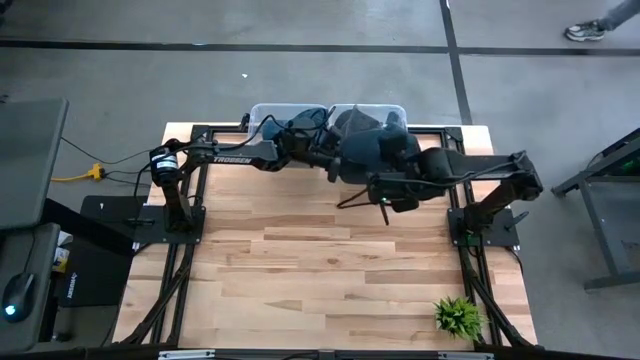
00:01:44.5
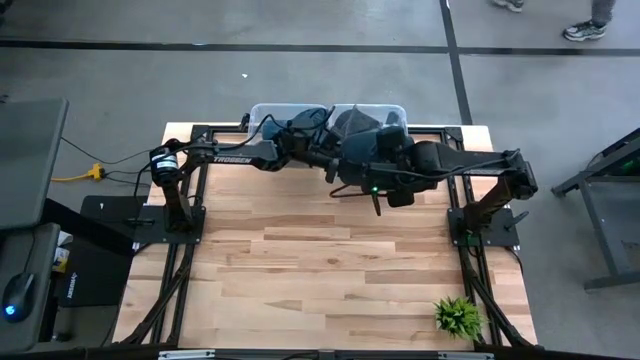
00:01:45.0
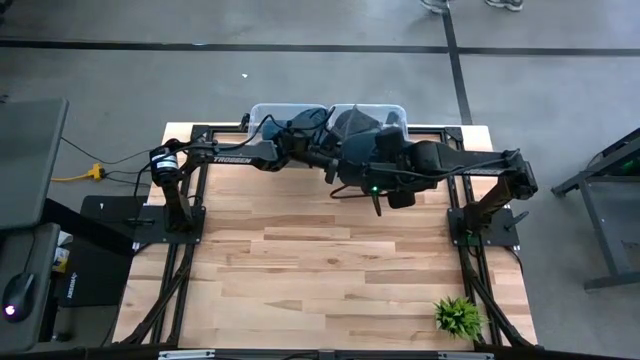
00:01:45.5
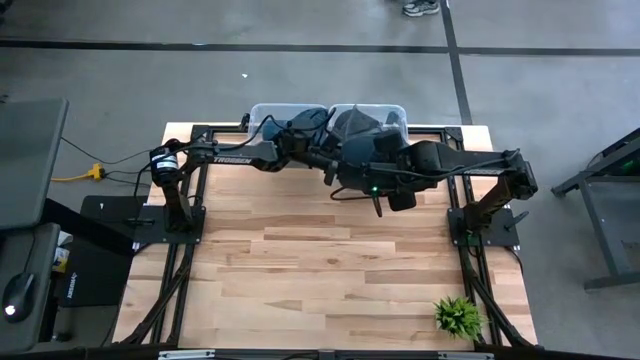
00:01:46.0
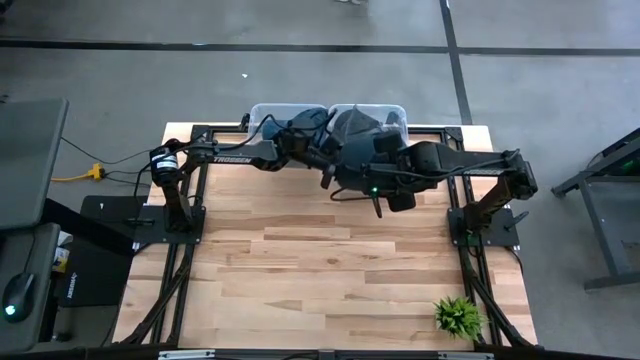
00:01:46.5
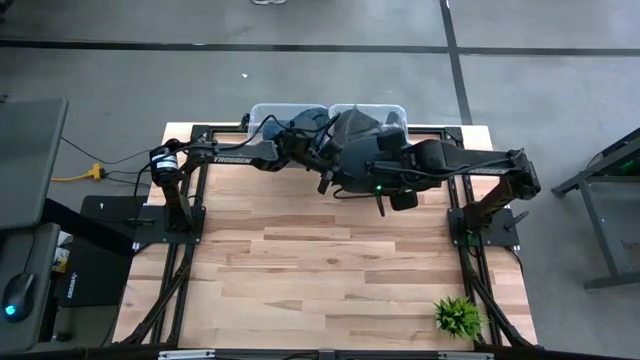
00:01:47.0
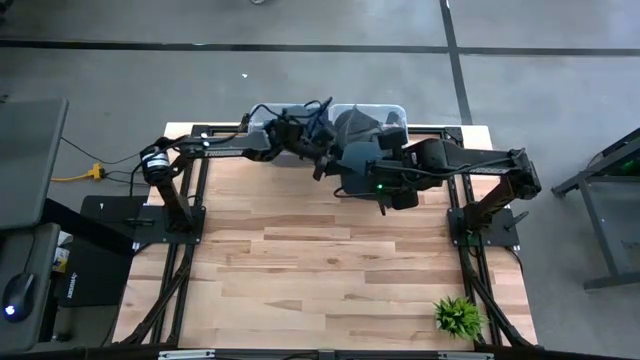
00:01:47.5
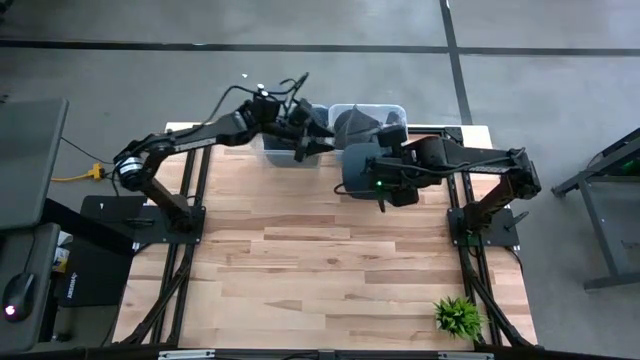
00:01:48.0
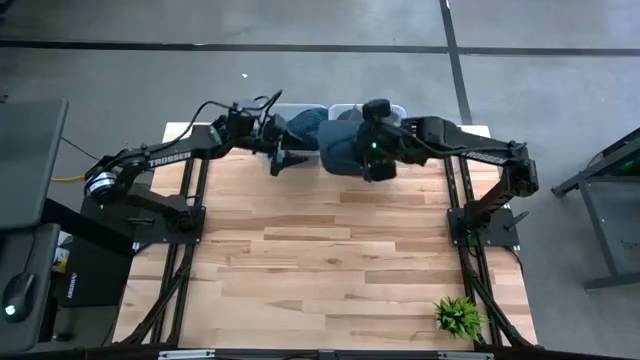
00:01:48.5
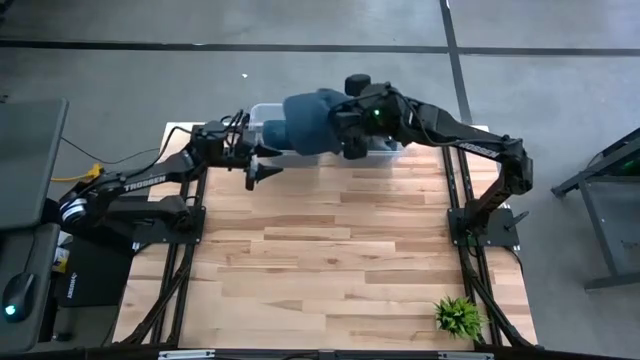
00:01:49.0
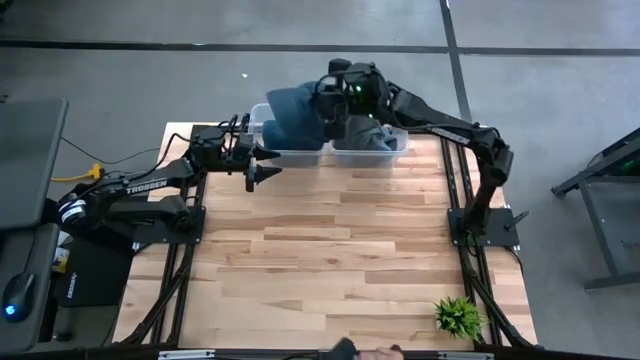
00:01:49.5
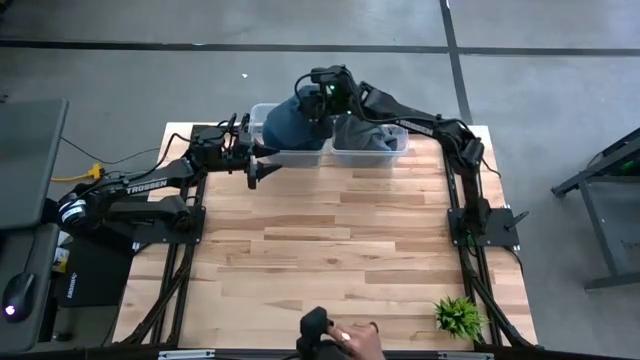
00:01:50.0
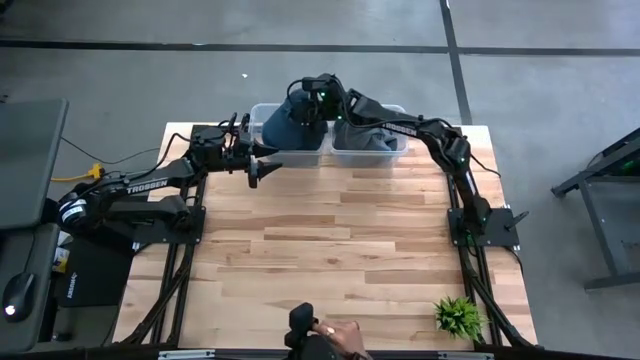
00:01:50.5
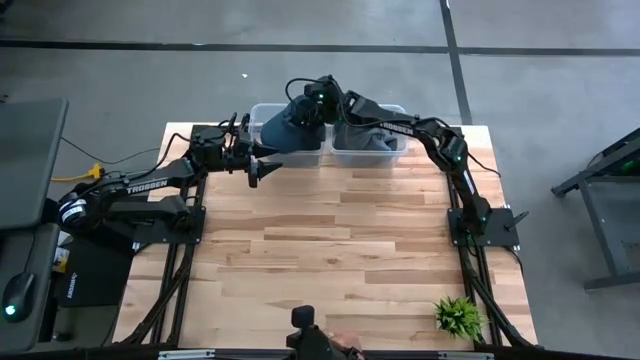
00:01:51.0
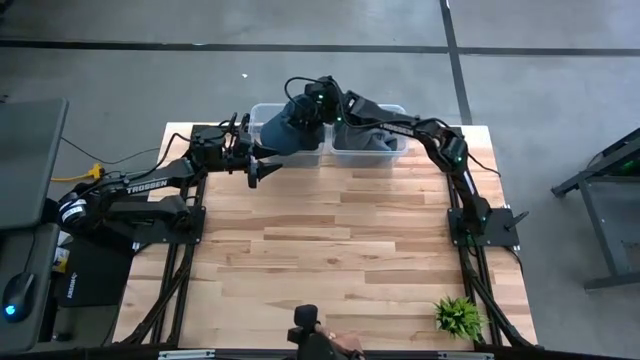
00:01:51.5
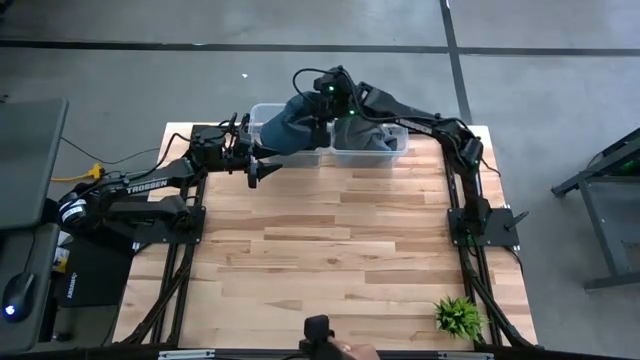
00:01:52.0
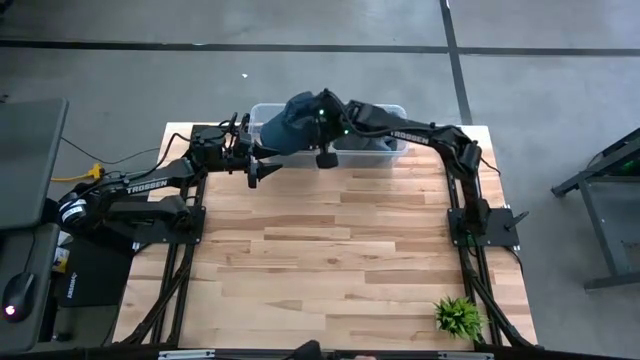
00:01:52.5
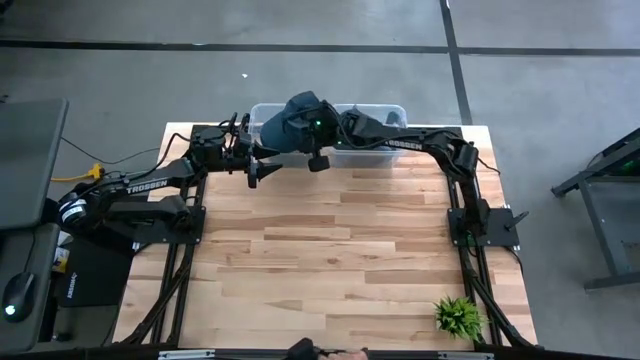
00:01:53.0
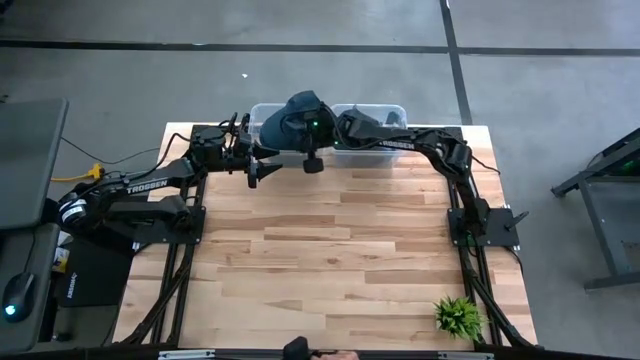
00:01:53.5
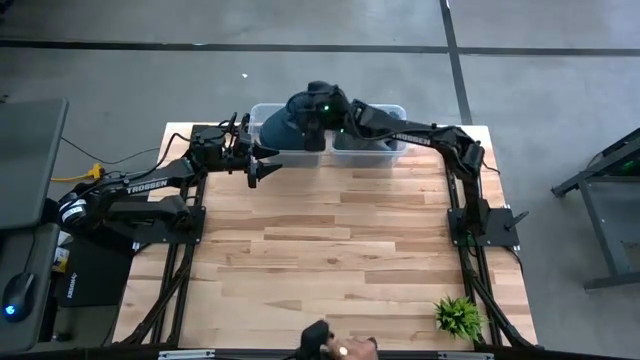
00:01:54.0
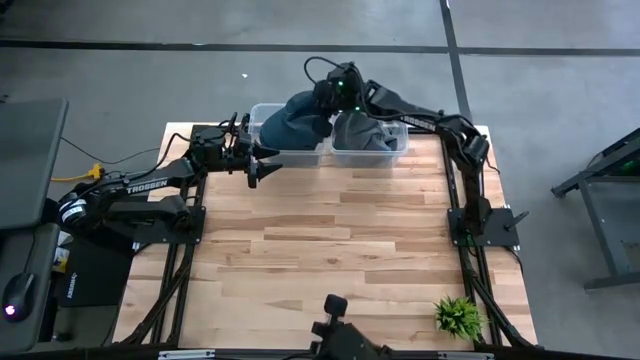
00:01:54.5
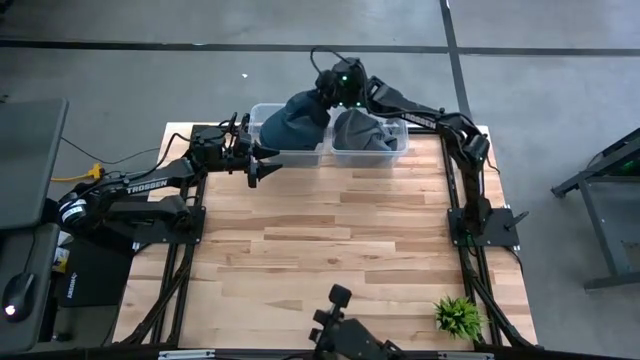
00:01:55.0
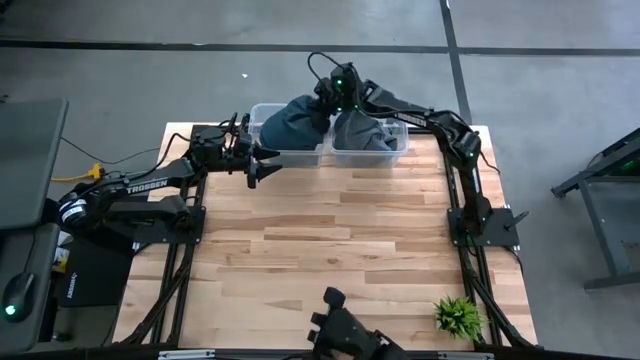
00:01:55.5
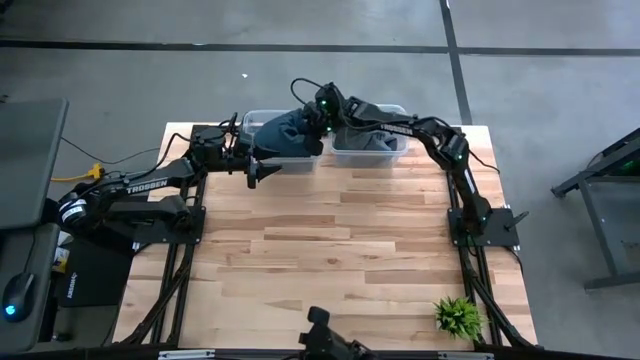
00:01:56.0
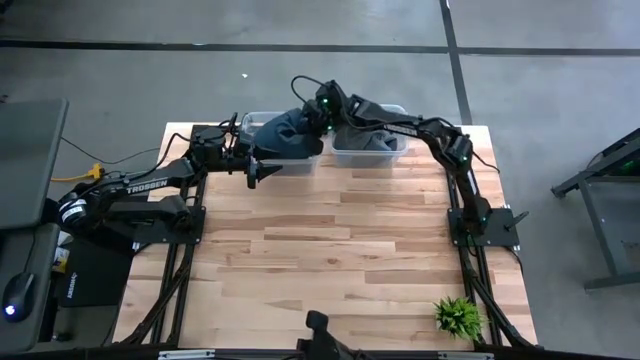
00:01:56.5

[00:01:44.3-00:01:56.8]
Task: Pick and place caps into container
Put the blue cap into the left transparent container

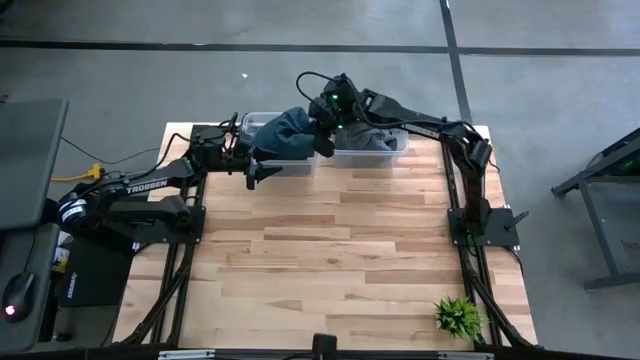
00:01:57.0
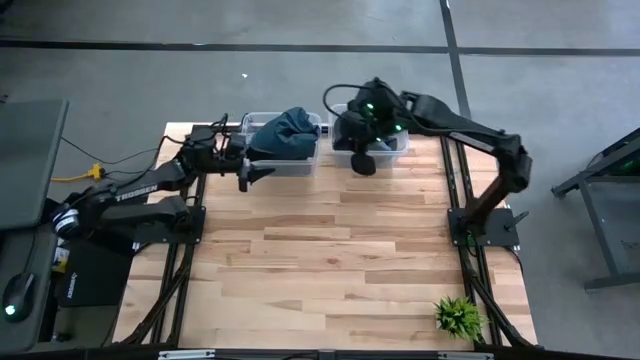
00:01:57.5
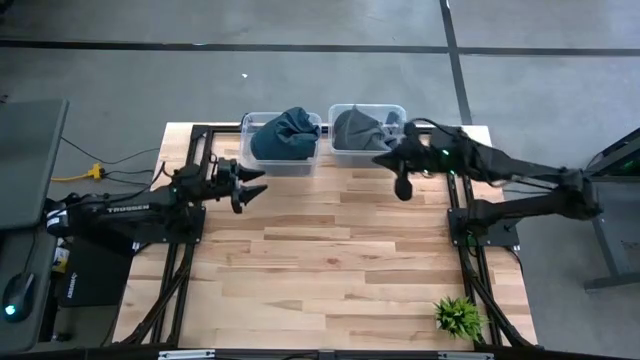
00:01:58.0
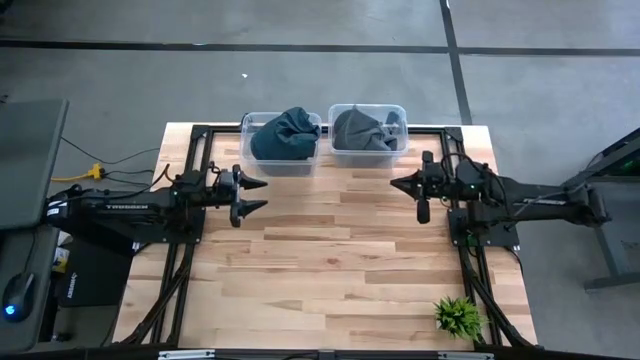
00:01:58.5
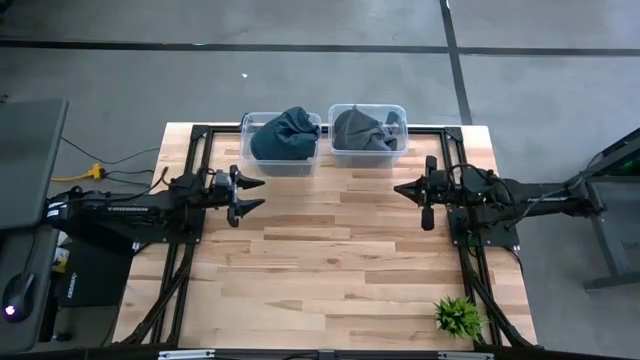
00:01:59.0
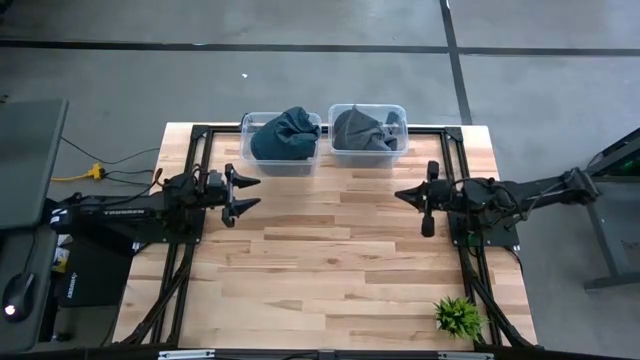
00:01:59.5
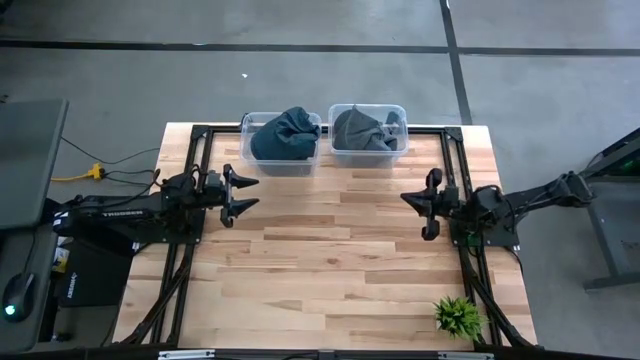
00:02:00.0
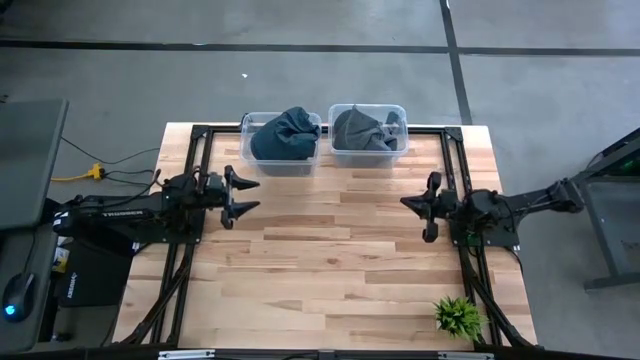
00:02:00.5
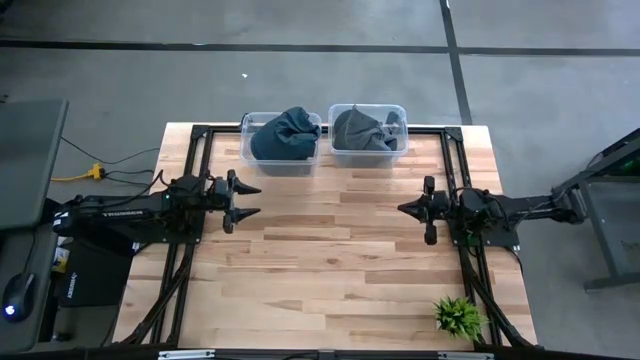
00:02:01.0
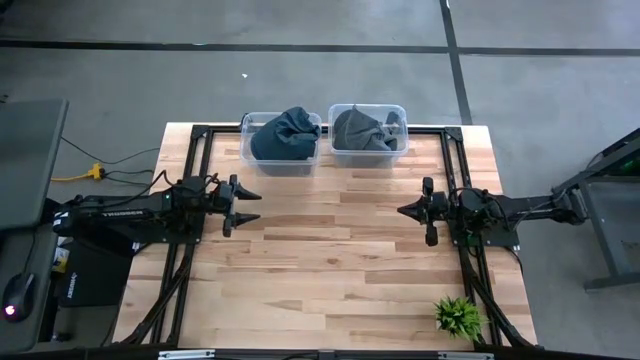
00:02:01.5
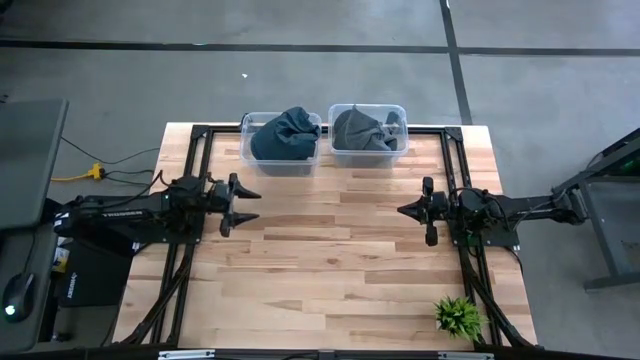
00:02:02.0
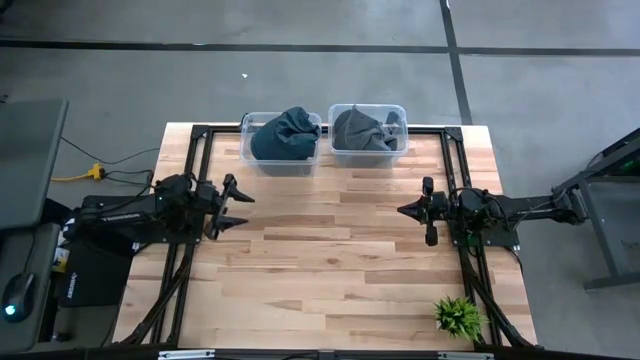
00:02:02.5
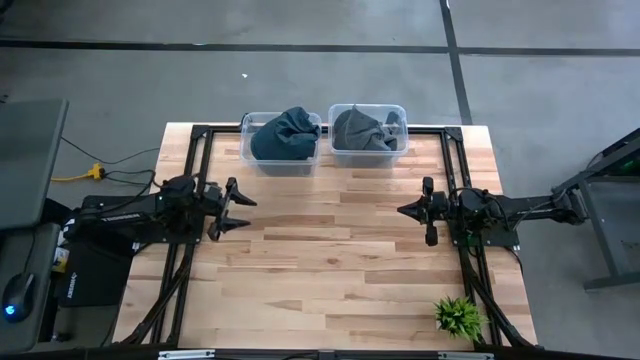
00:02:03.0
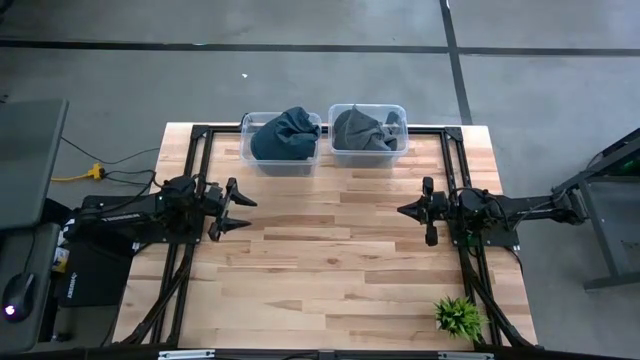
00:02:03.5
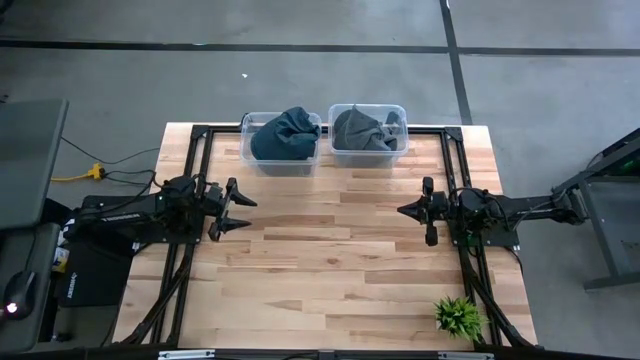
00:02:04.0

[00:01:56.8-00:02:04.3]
Return to Home Position
